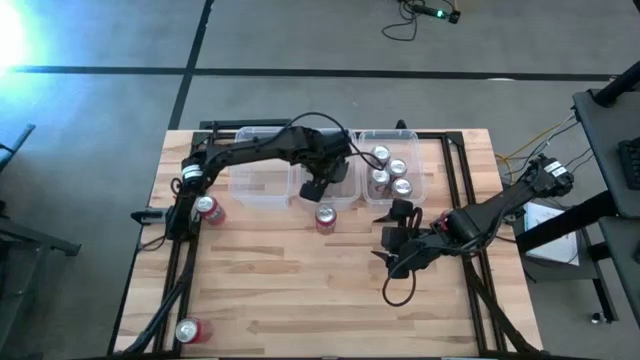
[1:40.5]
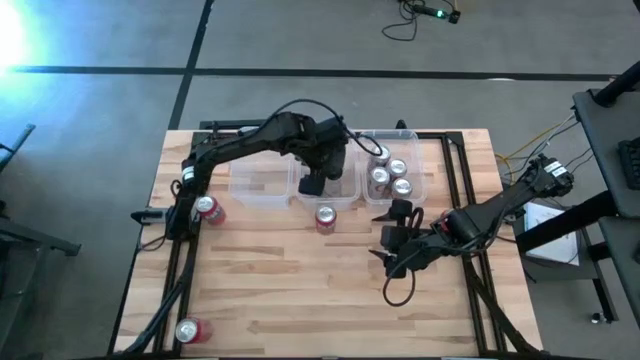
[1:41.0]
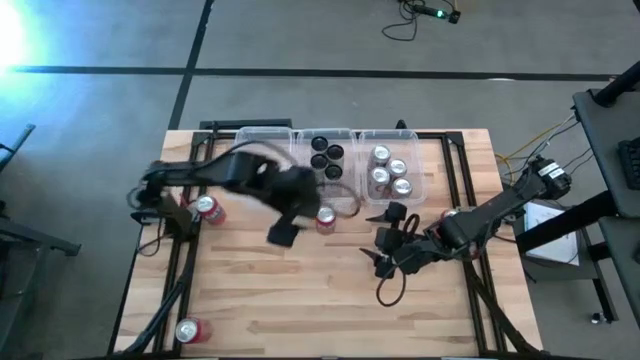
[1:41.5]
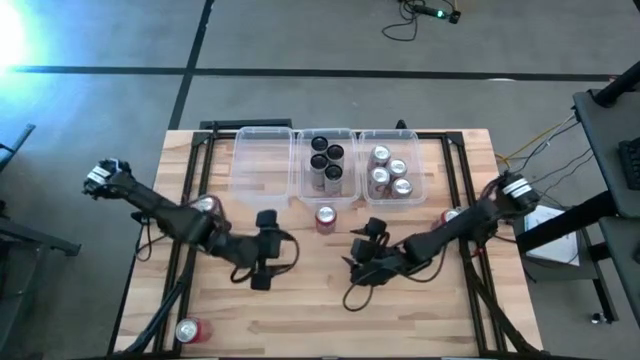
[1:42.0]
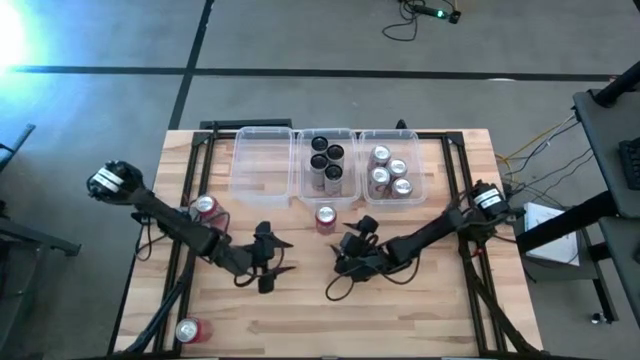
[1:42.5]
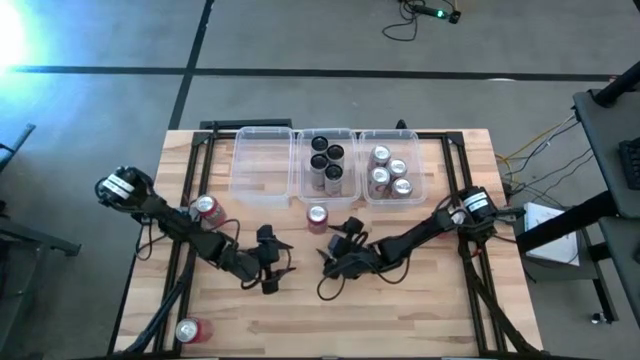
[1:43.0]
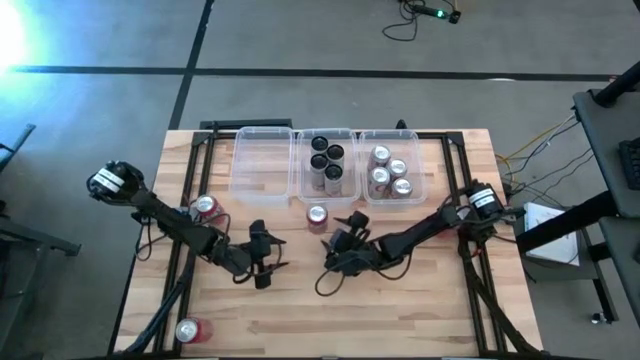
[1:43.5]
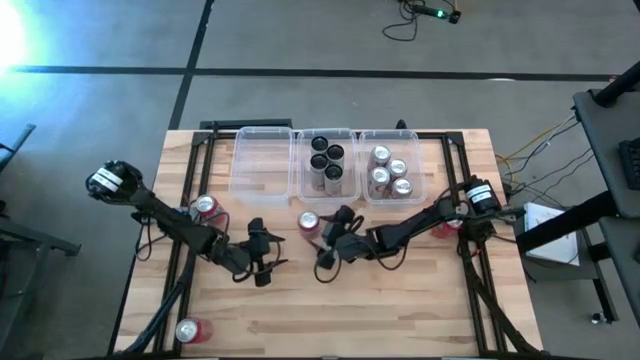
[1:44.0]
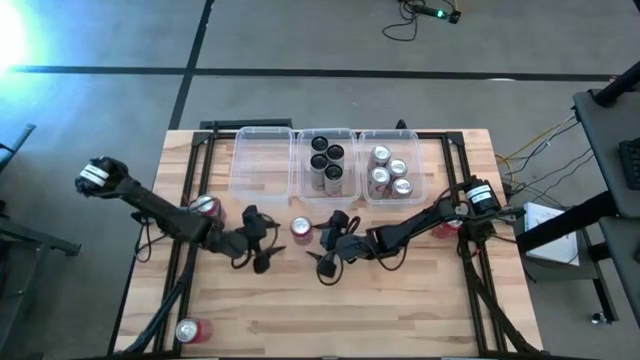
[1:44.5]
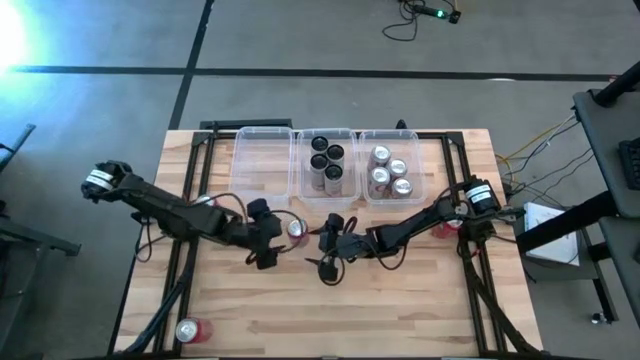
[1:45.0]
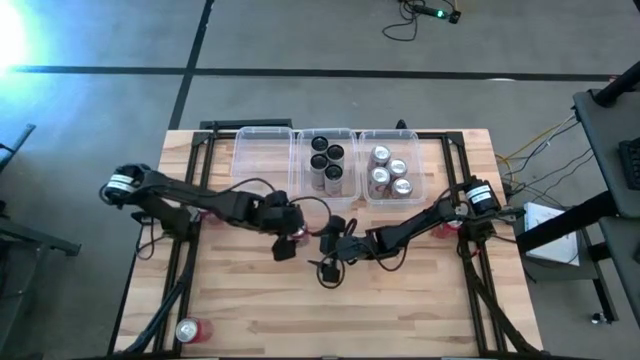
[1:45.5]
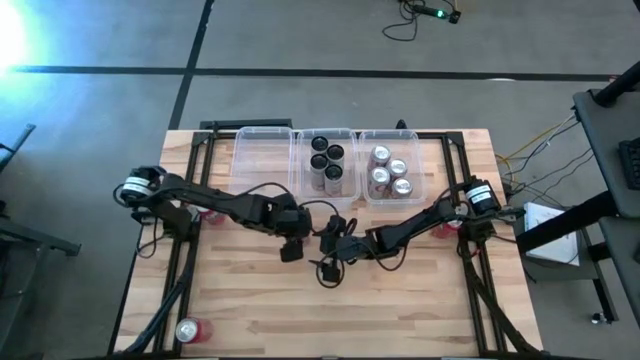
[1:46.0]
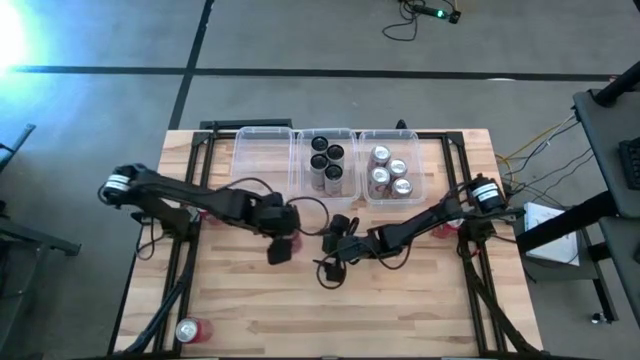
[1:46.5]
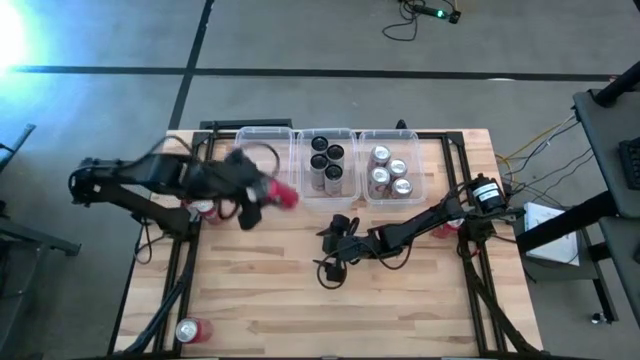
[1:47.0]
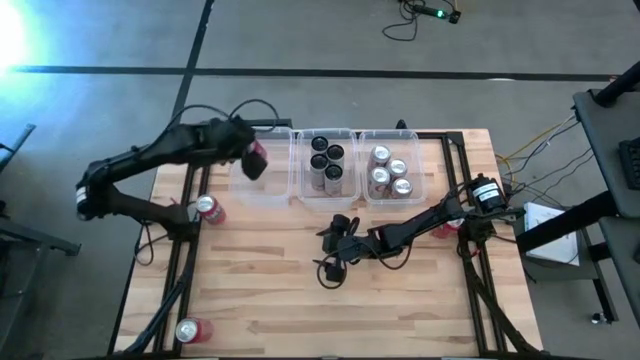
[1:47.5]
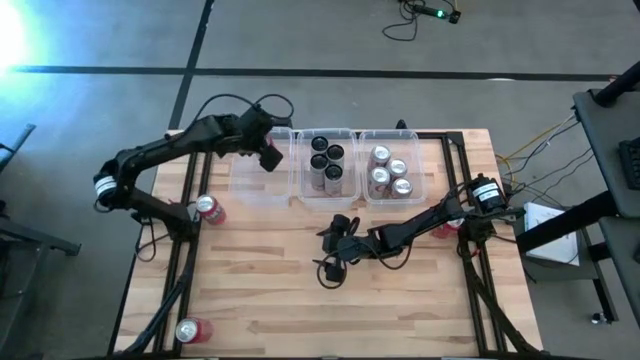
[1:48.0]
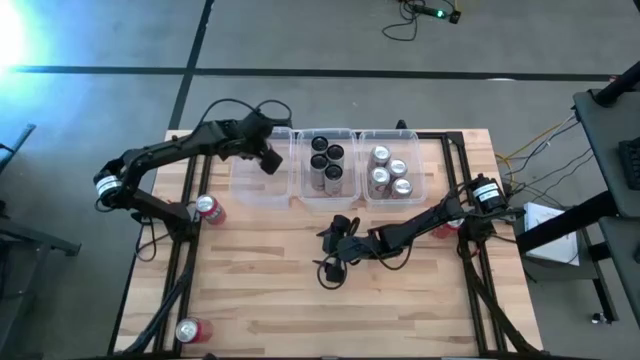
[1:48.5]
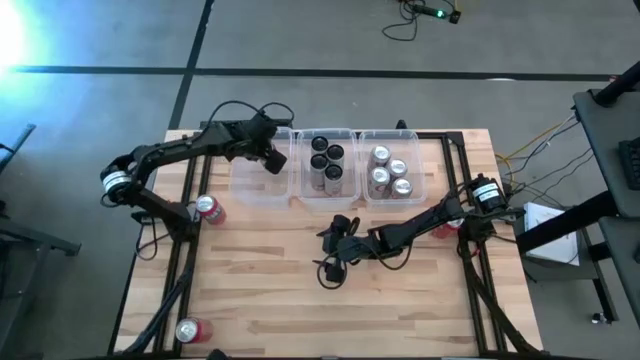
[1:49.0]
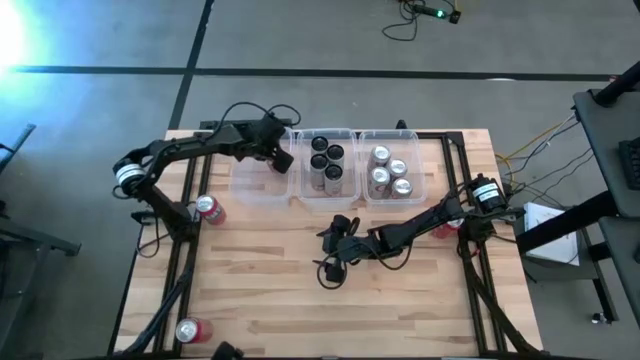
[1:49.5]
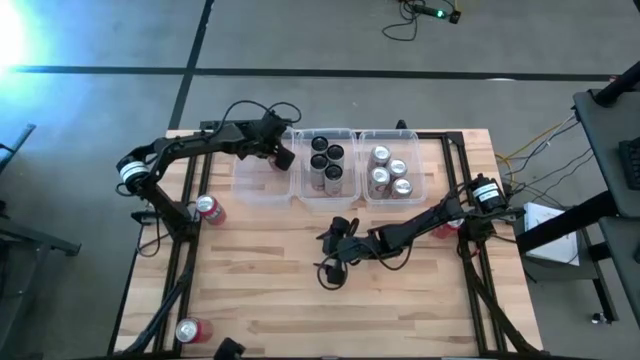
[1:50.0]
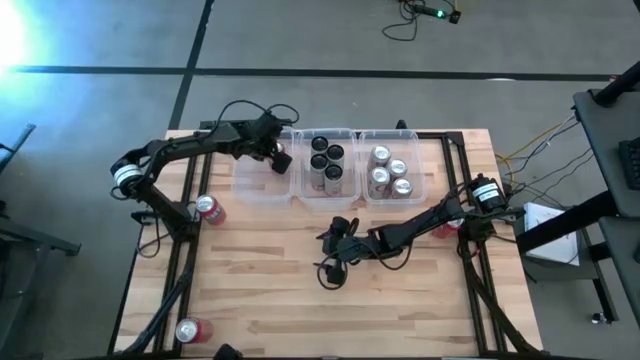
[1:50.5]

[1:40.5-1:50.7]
Task: Sort soda cans
Put the top middle red soda can into the left transparent bin

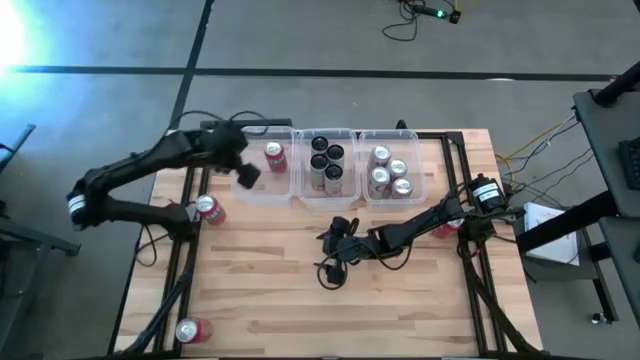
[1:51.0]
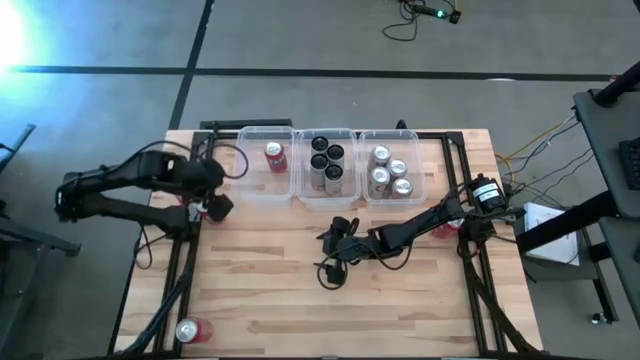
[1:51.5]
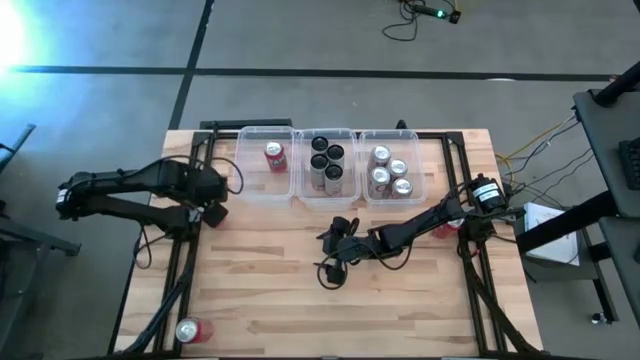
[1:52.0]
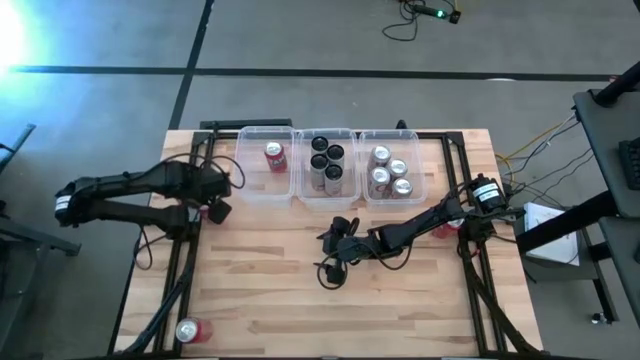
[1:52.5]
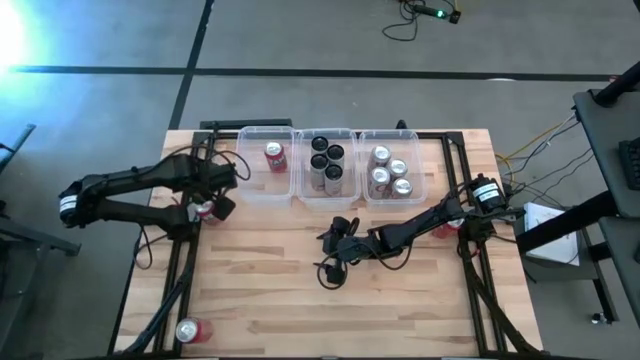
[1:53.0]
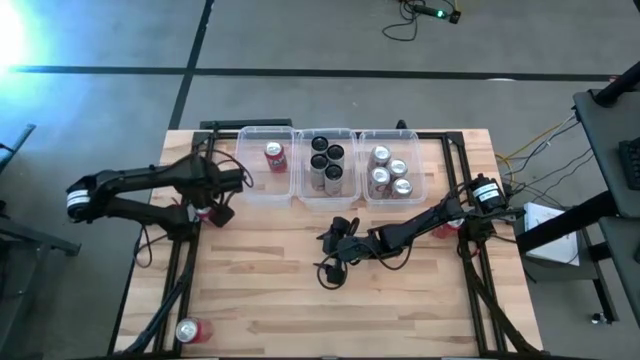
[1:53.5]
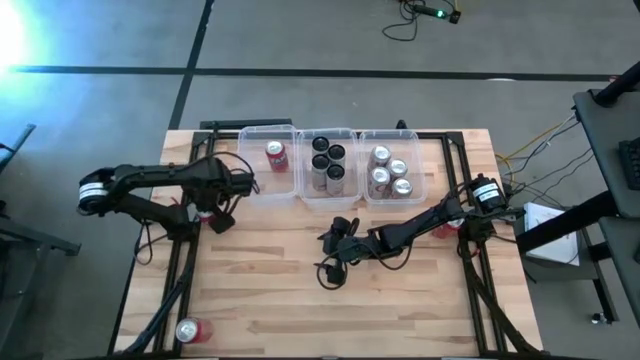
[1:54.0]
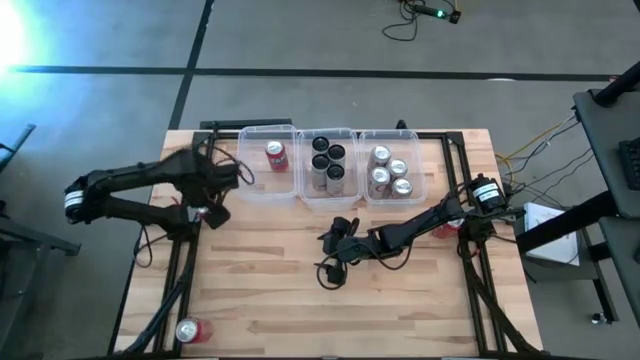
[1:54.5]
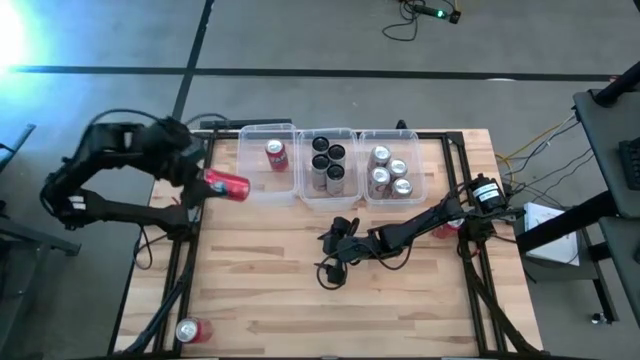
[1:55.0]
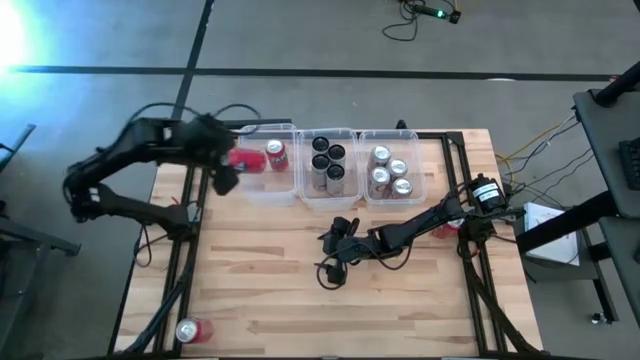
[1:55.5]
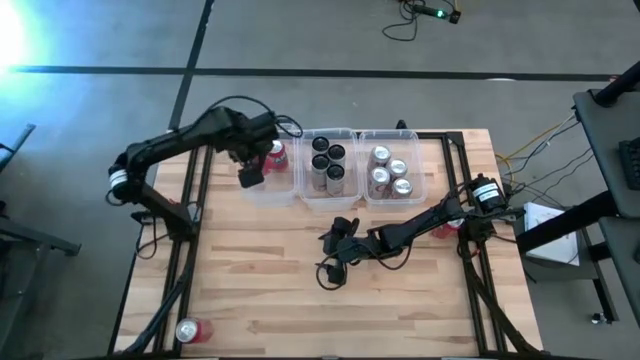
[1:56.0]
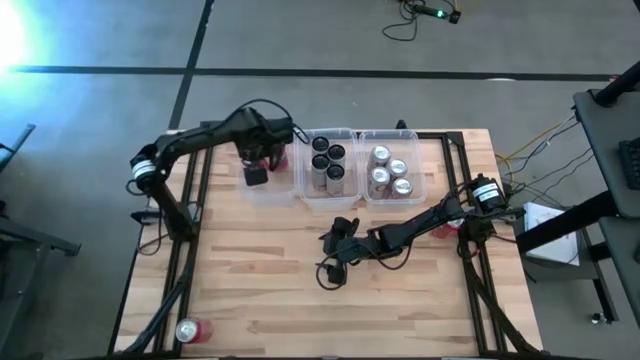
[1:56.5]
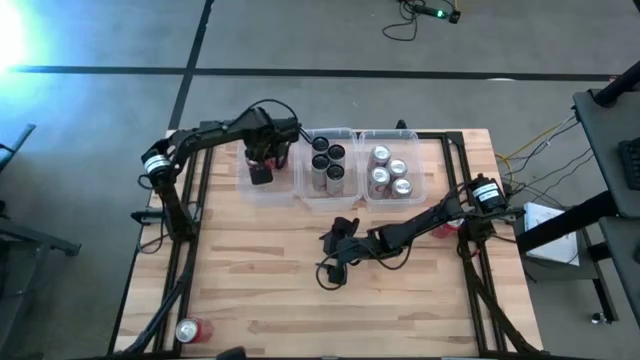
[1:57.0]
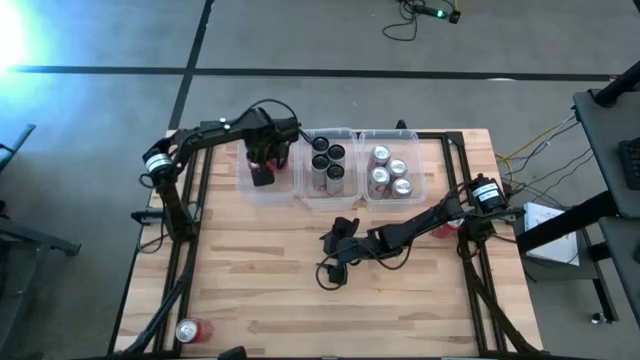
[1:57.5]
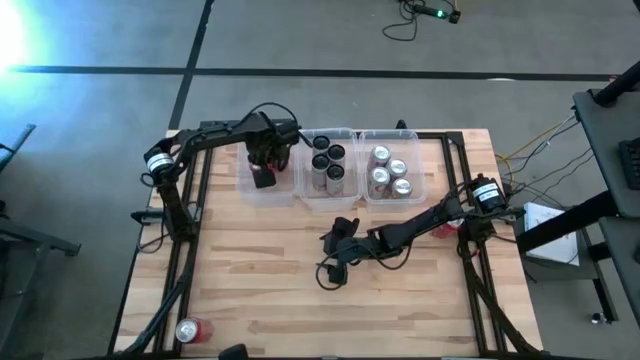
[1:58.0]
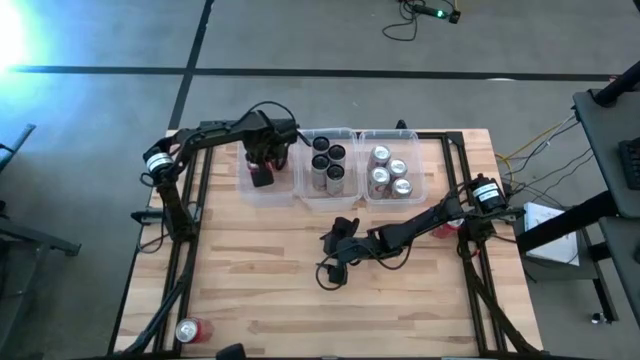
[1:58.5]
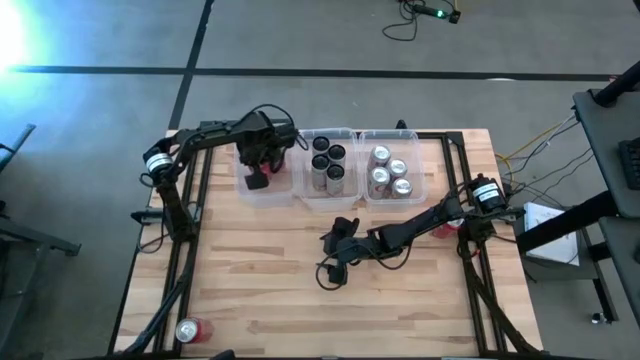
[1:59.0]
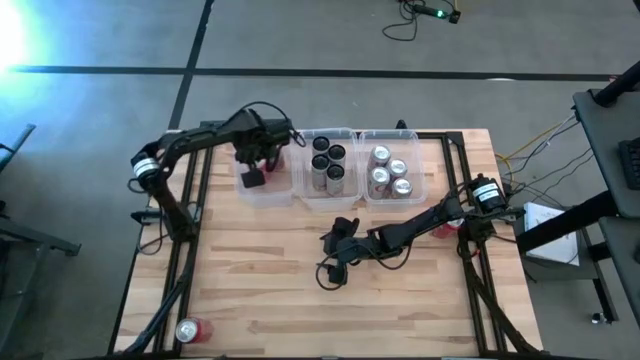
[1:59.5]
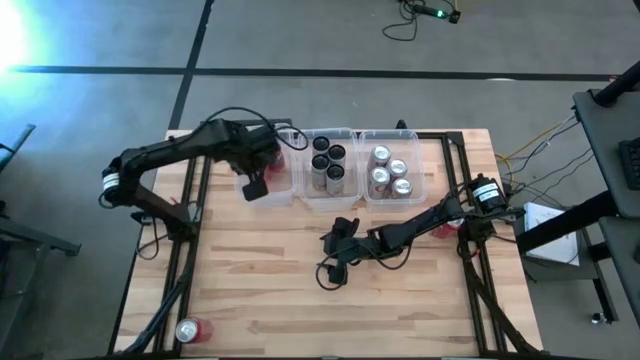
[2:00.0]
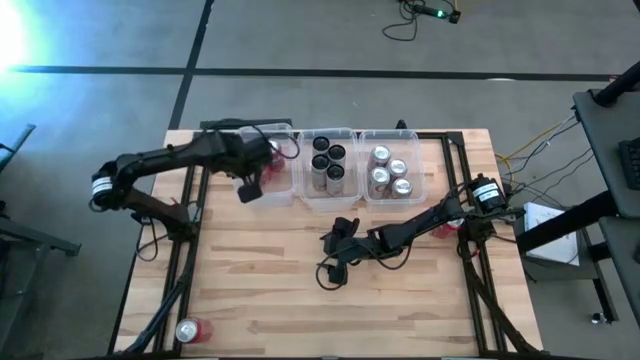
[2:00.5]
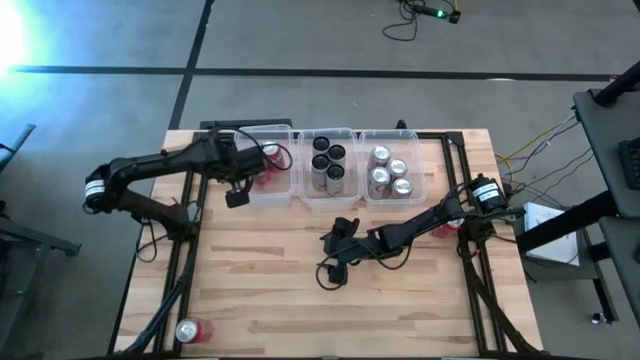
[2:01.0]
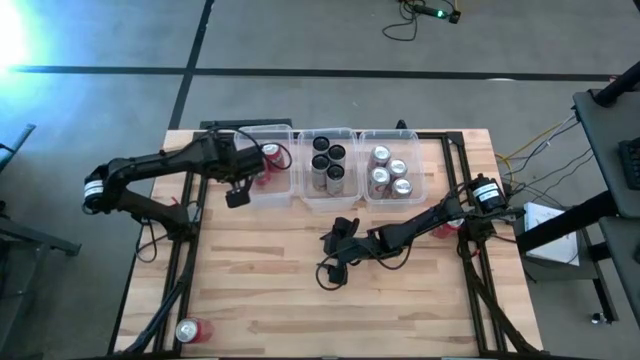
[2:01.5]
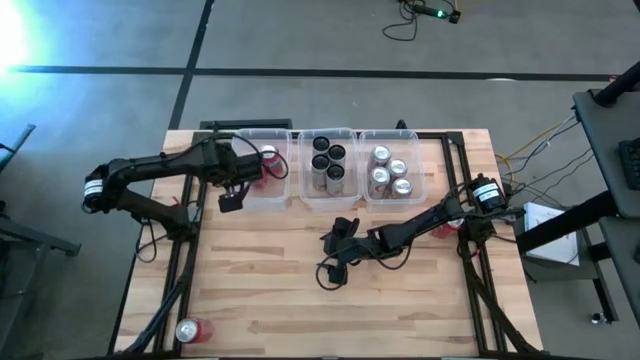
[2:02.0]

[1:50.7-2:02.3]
Put the top left red soda can into the left transparent bin

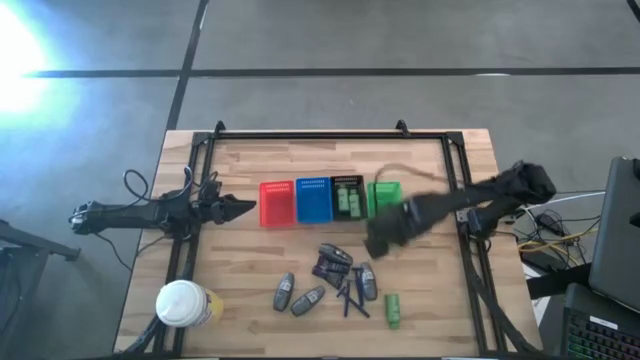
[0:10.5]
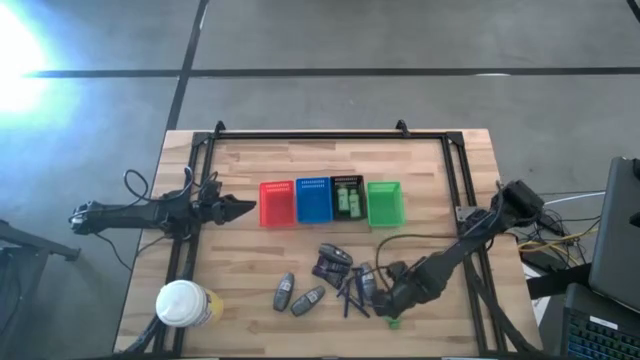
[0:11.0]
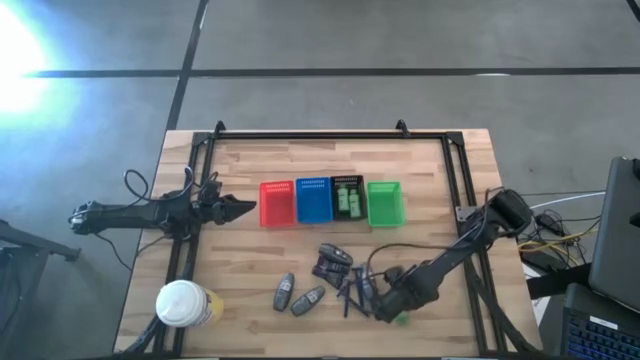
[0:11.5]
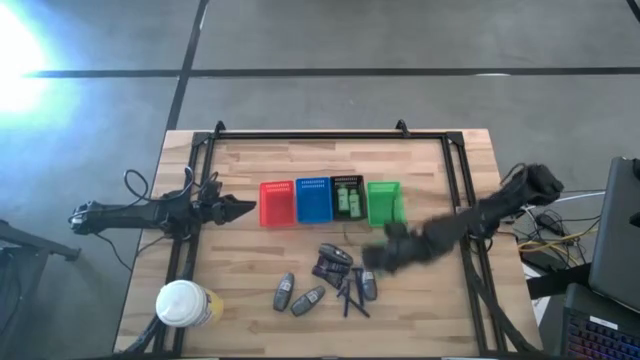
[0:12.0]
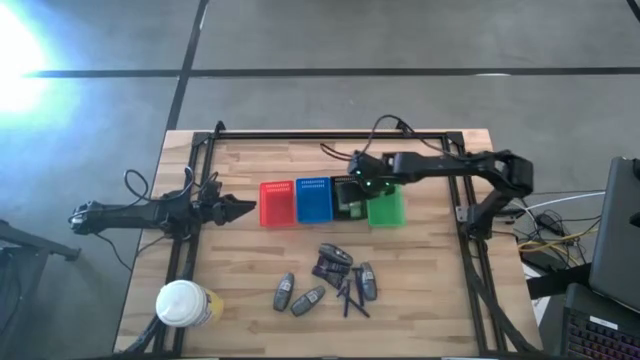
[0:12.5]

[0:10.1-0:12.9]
Task: Pick & Place Travel size toiletries
Put the green shampoo into the black basket
